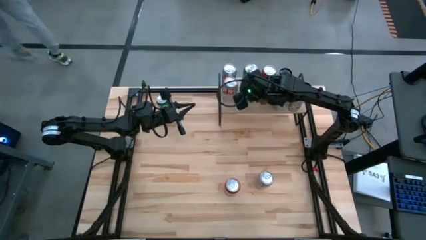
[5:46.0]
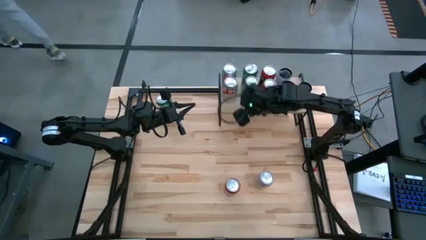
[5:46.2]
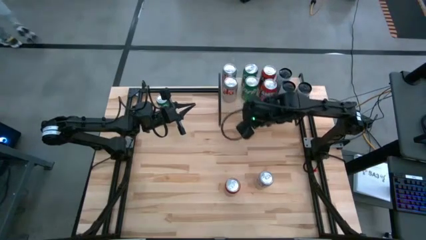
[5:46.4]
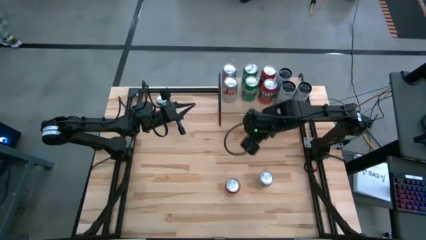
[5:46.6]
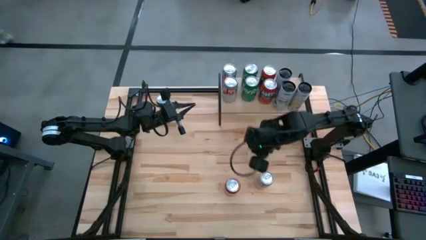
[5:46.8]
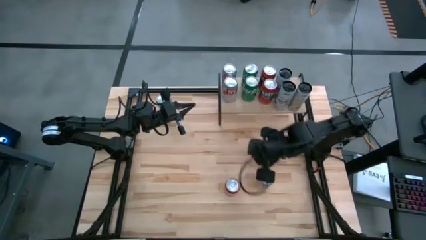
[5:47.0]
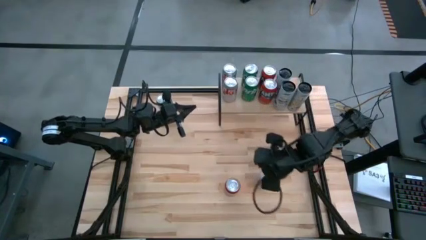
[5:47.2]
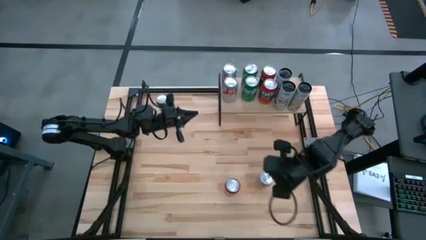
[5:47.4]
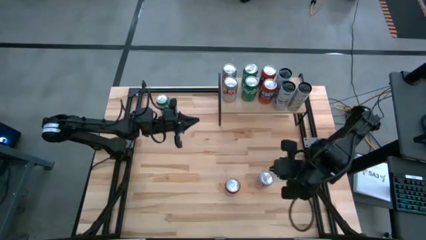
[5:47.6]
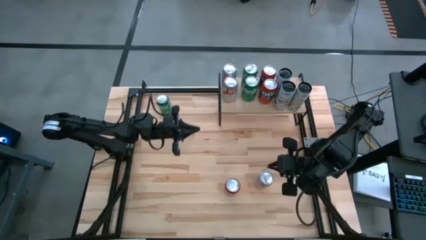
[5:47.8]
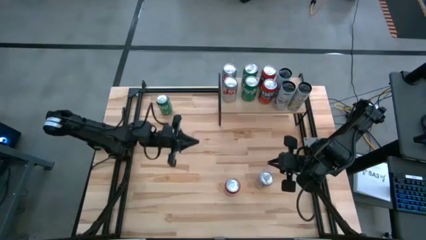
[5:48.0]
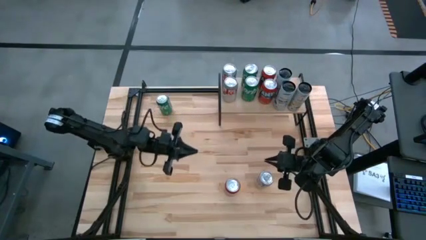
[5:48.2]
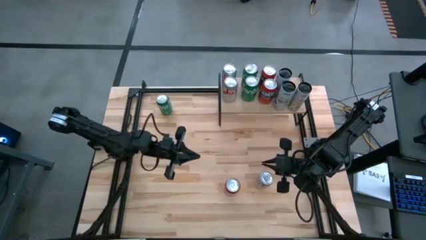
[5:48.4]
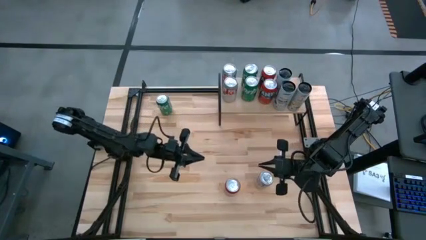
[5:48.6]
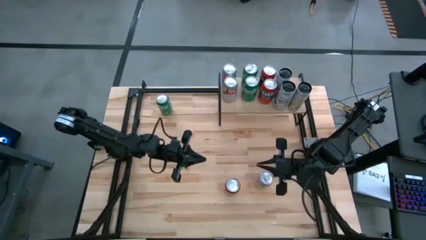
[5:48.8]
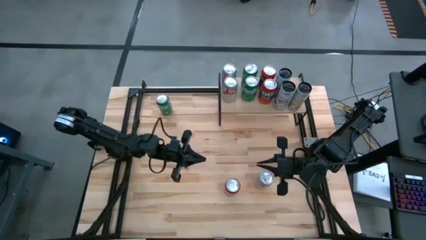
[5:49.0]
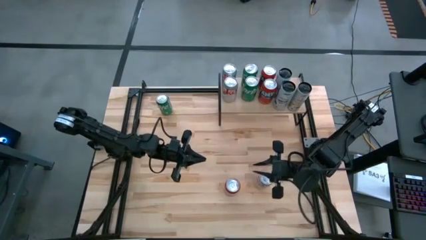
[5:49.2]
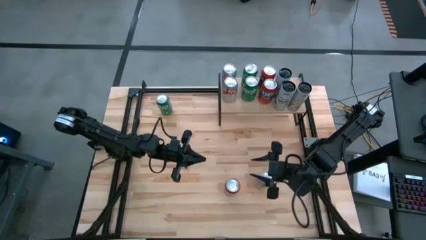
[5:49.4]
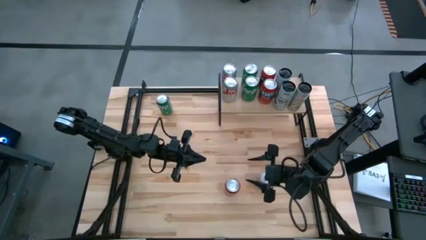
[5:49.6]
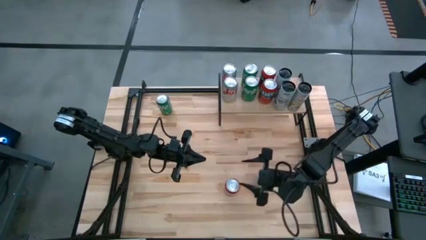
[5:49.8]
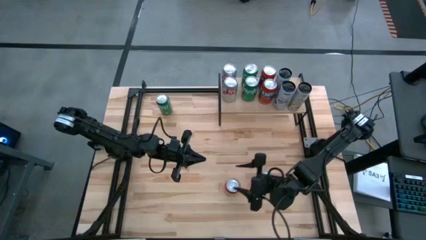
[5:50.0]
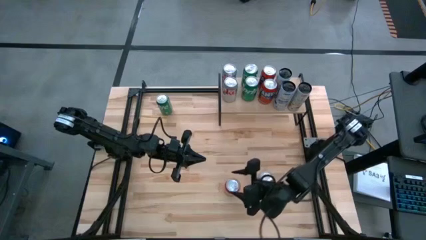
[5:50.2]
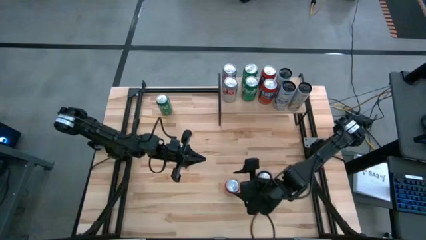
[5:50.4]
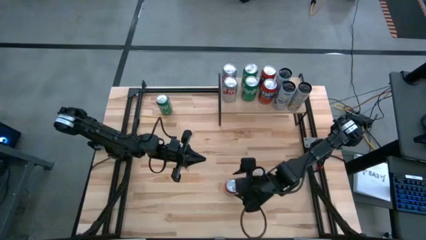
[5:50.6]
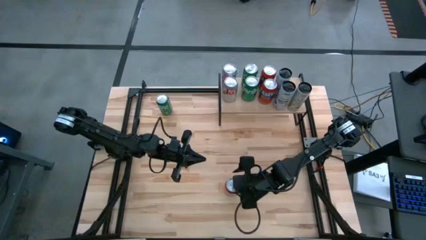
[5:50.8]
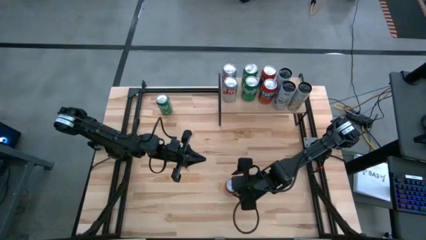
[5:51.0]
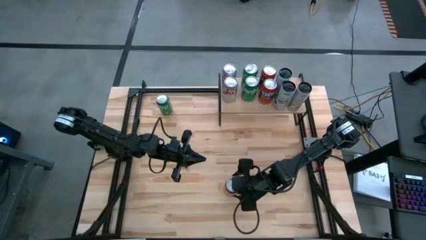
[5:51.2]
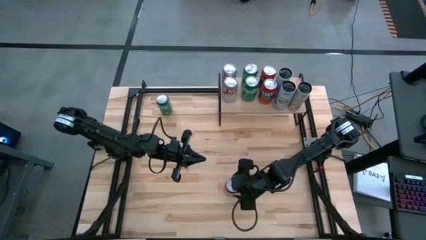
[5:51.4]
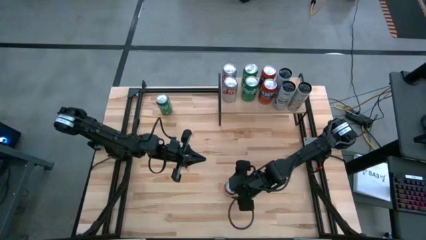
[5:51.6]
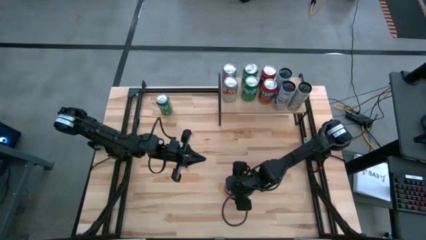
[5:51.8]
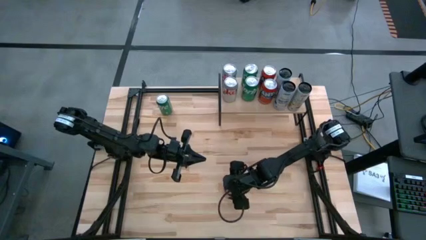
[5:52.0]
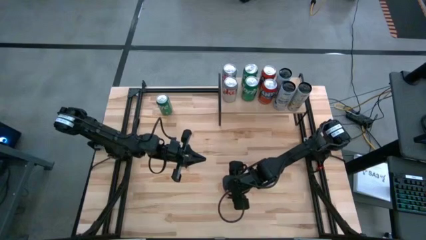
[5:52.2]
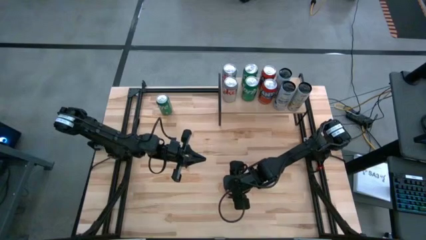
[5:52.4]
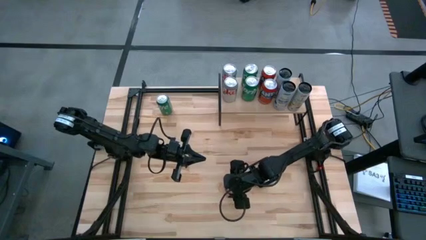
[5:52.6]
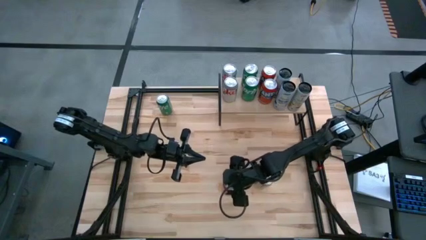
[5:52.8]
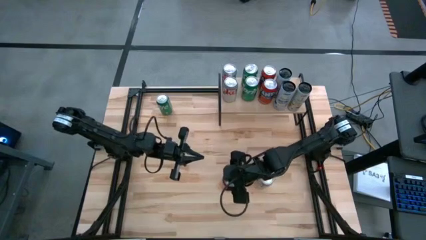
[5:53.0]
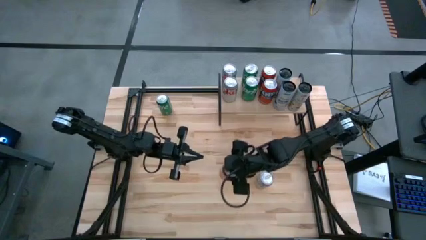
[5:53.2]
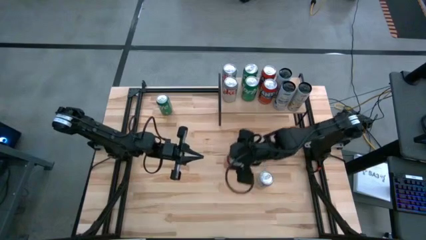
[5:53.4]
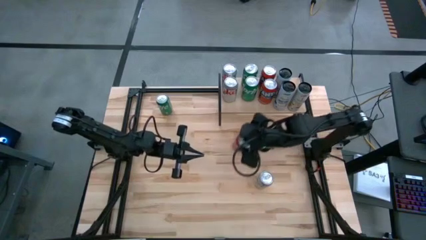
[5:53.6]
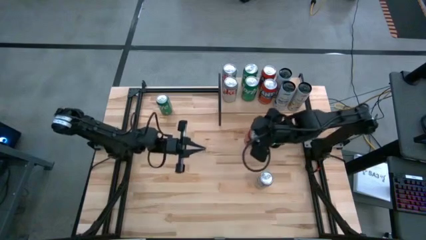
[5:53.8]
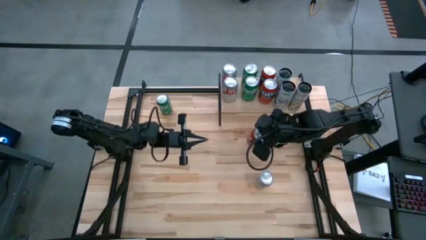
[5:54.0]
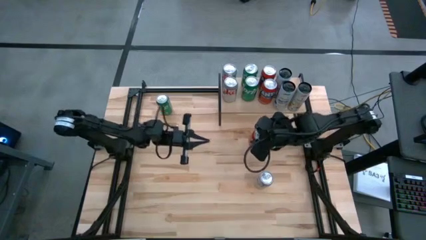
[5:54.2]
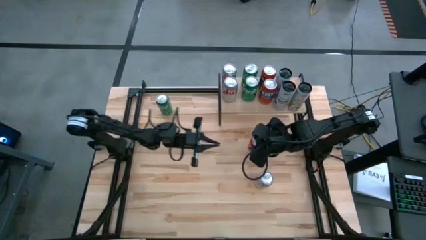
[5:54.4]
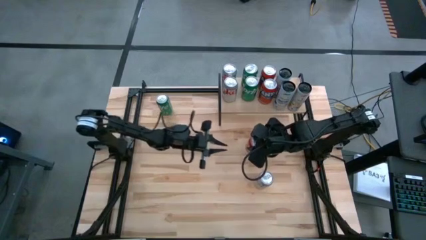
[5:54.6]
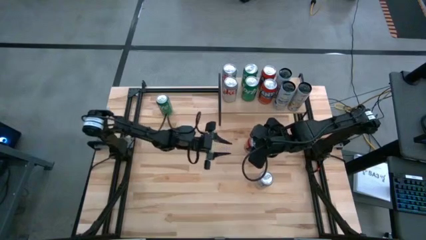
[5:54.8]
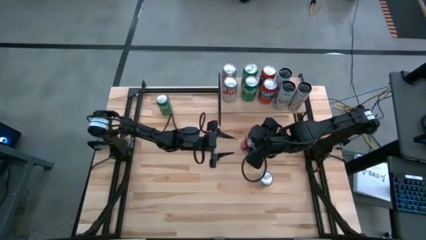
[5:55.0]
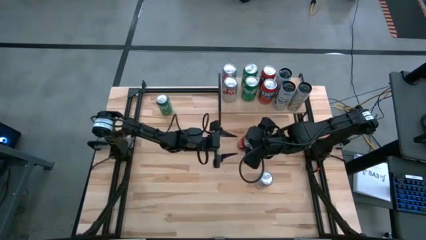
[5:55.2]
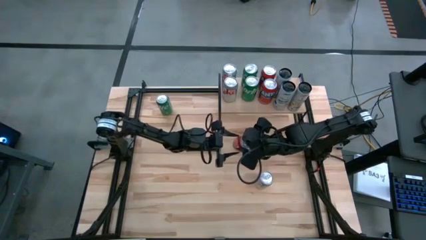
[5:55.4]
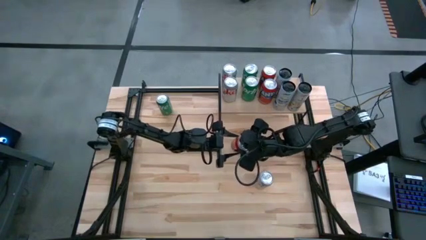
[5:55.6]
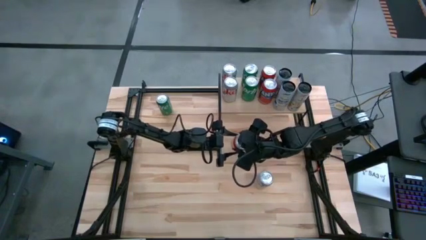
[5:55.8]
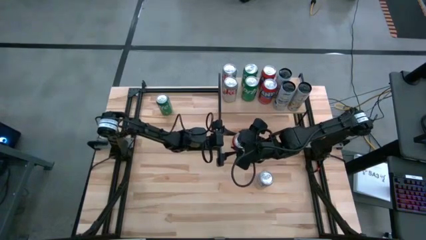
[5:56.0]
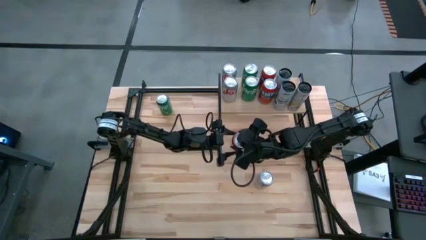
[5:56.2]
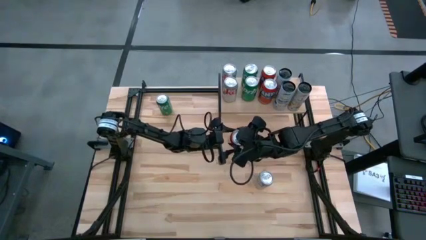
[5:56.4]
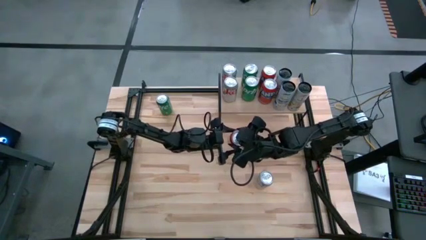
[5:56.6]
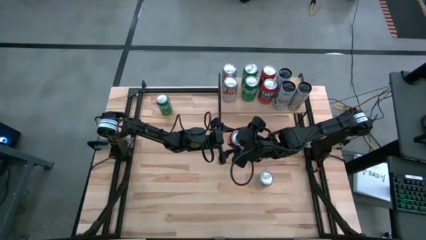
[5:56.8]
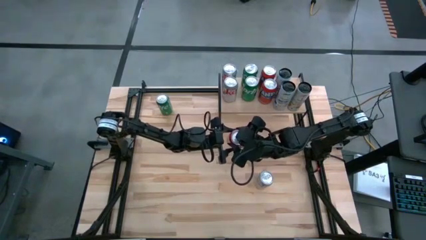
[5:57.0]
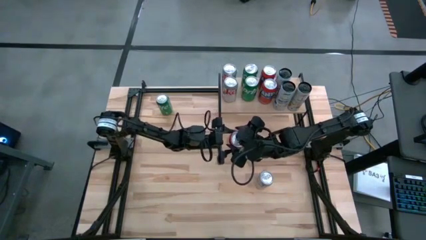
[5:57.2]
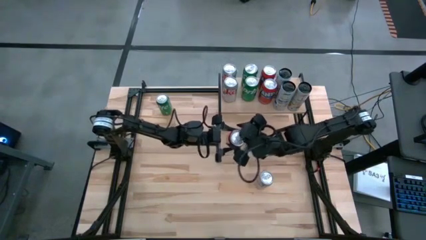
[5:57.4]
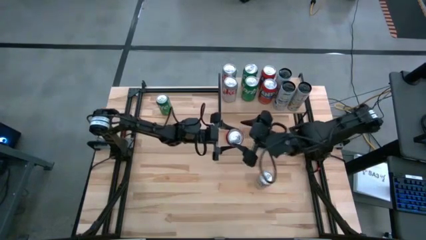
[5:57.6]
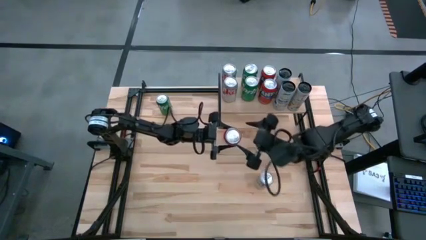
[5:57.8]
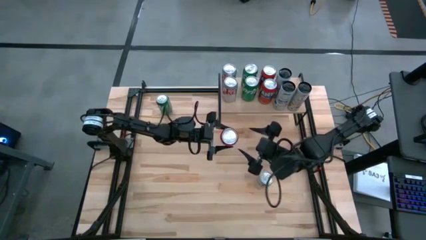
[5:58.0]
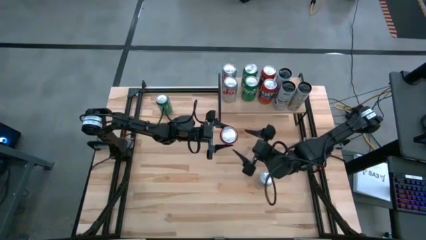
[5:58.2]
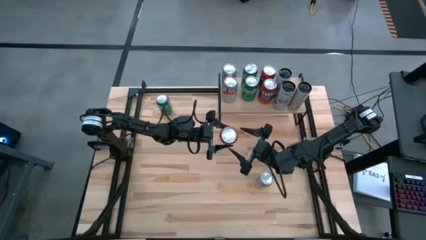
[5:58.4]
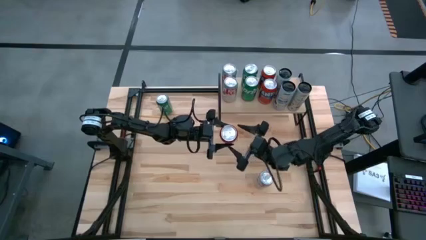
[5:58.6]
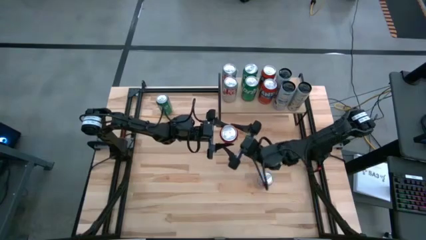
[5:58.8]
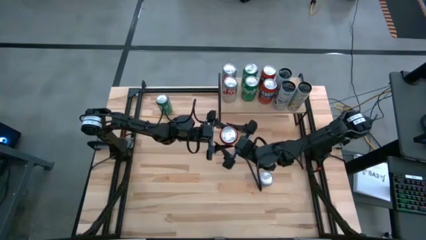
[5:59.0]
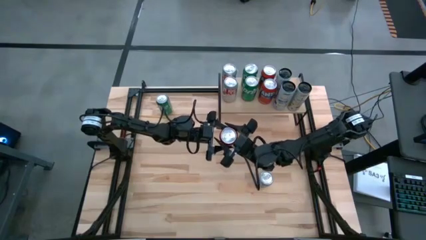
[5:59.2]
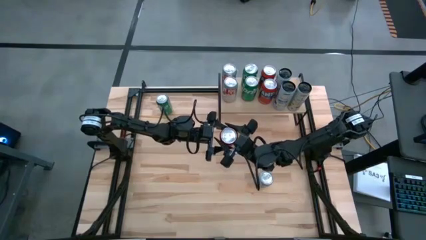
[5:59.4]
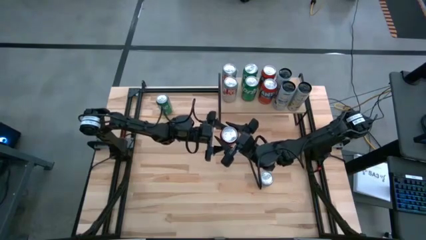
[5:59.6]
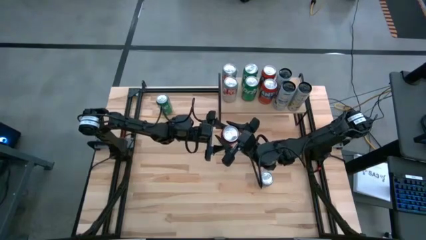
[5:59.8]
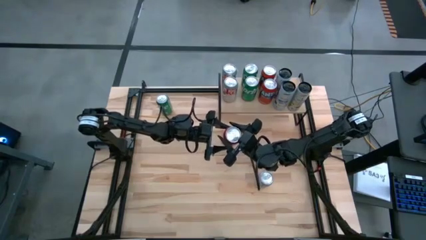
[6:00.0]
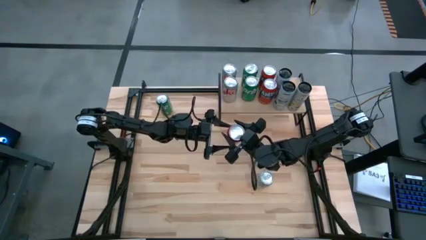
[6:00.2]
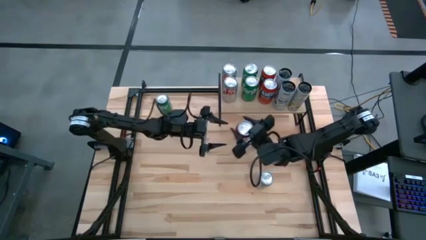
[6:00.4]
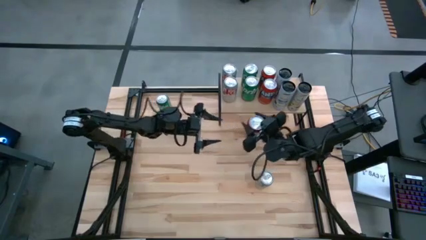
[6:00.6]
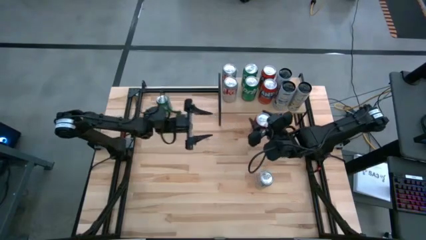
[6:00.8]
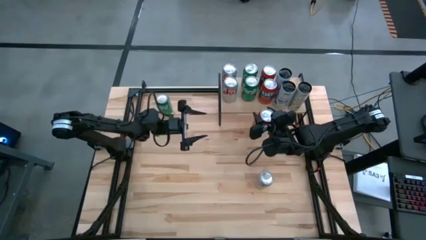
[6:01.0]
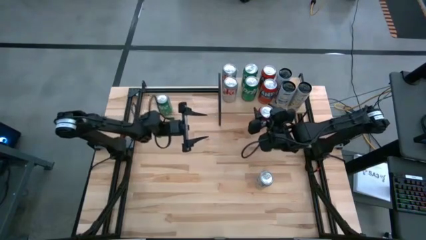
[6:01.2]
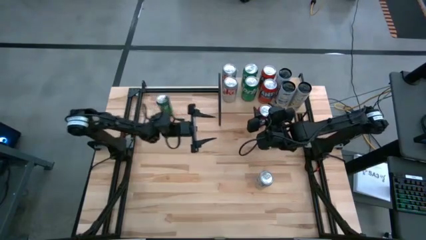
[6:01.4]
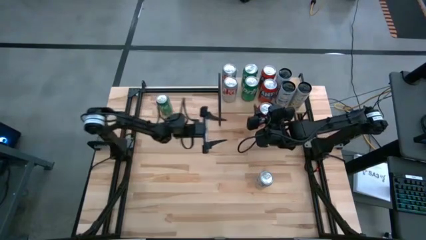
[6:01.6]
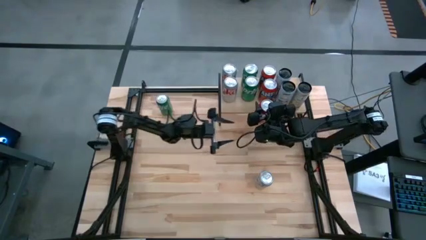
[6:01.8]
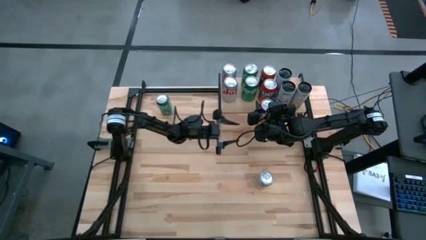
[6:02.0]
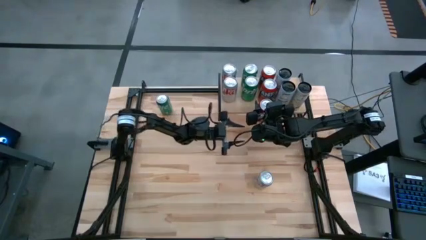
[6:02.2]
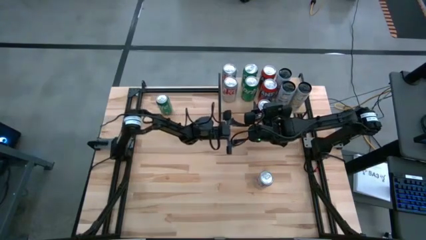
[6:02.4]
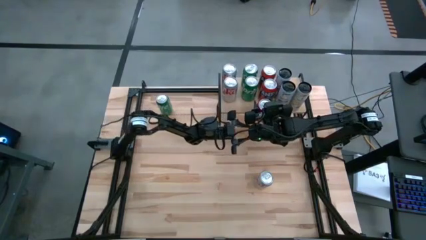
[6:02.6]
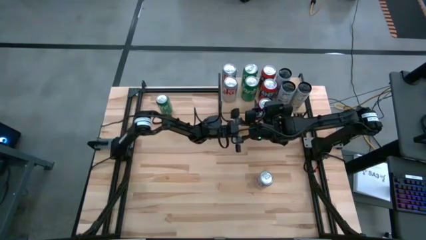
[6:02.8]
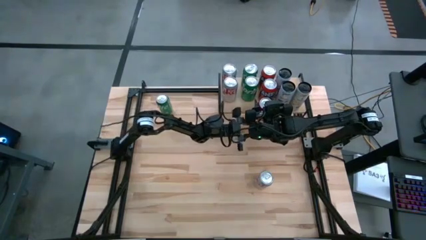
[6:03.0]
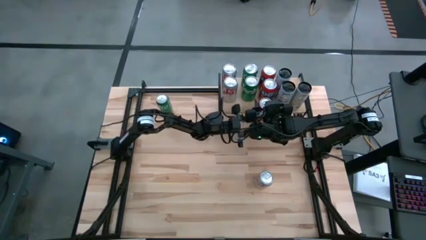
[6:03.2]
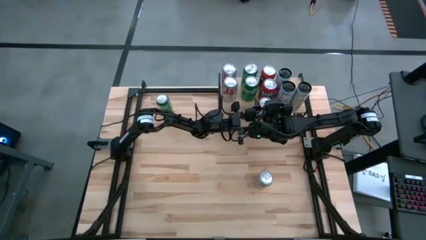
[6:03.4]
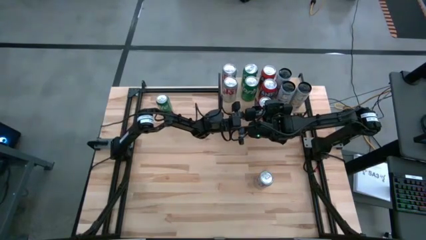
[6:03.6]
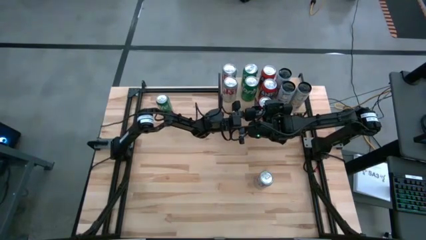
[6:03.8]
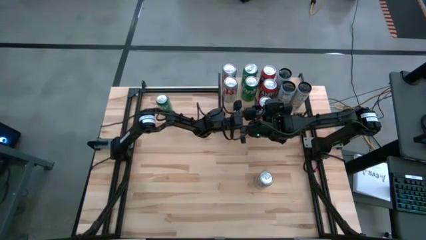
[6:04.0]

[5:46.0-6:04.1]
Task: Place canned beverage on shelf
Put the orange soda can on the shelf aligned in front of the other orange soda can
